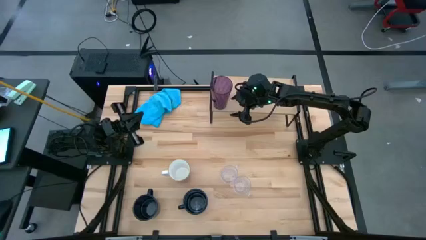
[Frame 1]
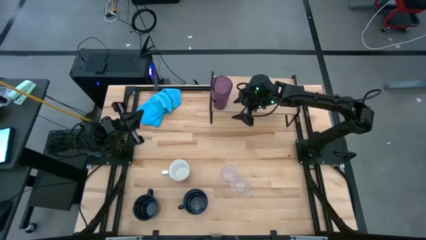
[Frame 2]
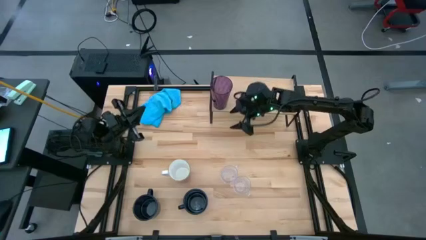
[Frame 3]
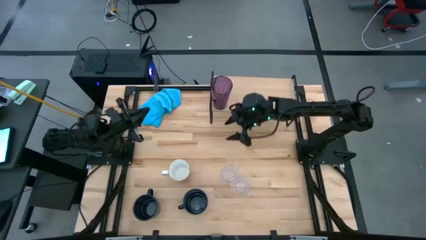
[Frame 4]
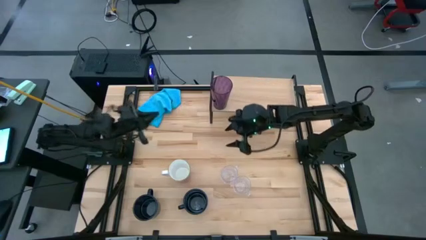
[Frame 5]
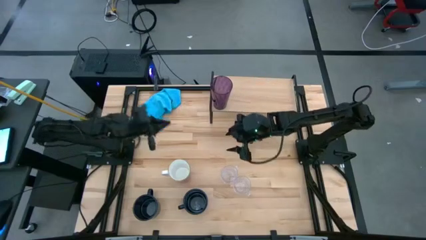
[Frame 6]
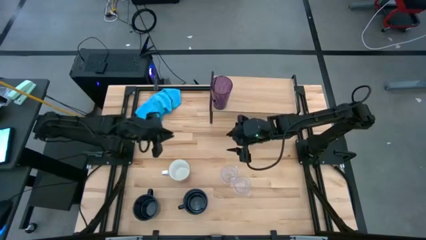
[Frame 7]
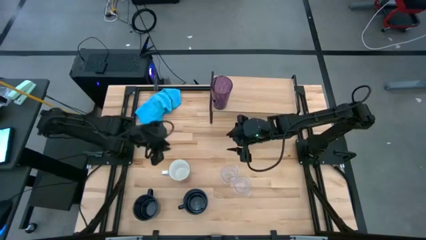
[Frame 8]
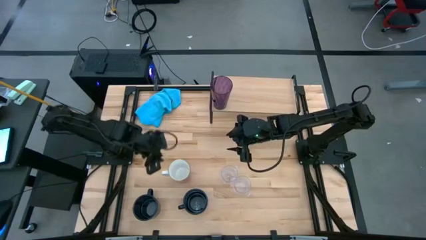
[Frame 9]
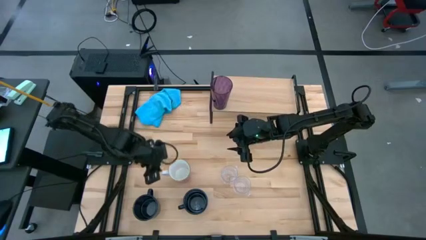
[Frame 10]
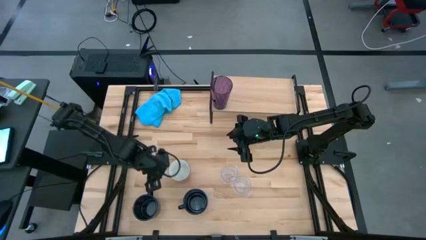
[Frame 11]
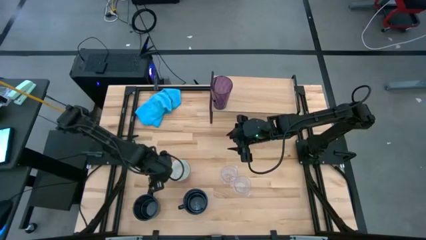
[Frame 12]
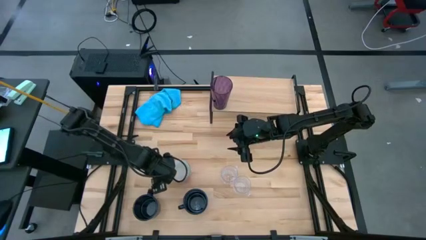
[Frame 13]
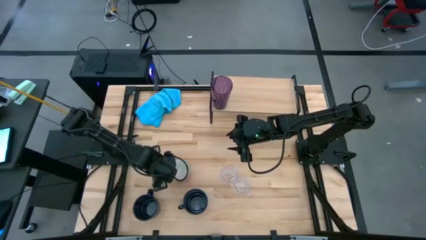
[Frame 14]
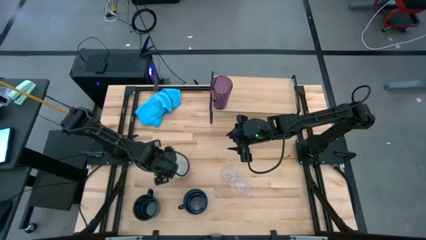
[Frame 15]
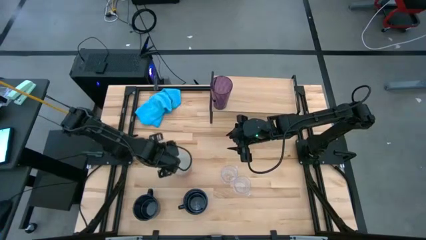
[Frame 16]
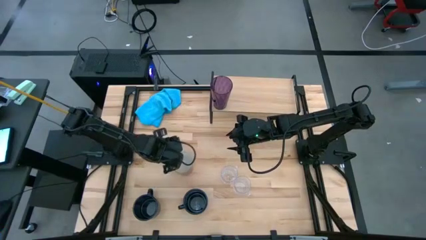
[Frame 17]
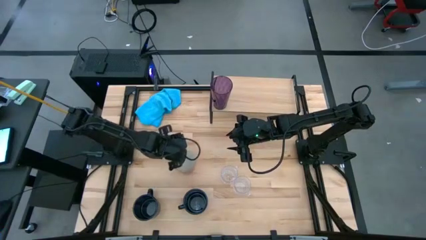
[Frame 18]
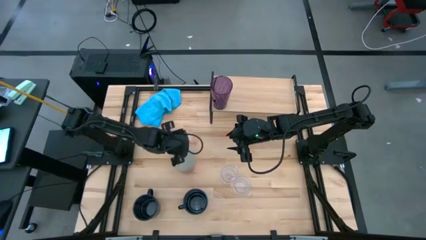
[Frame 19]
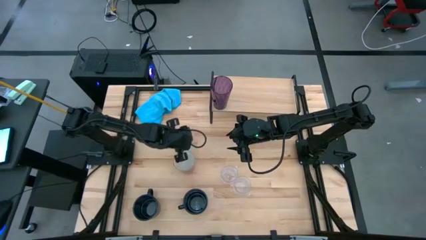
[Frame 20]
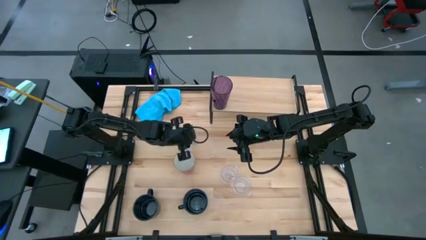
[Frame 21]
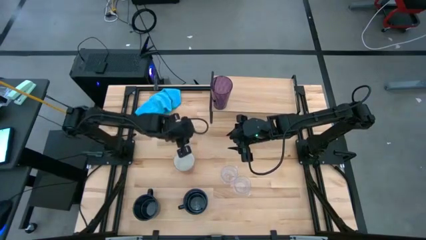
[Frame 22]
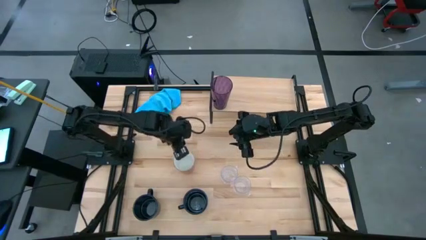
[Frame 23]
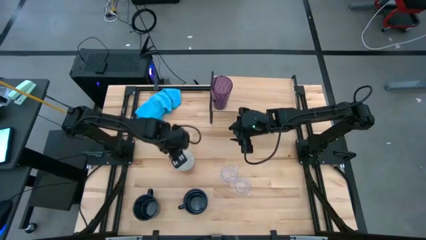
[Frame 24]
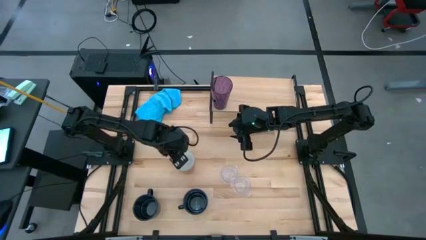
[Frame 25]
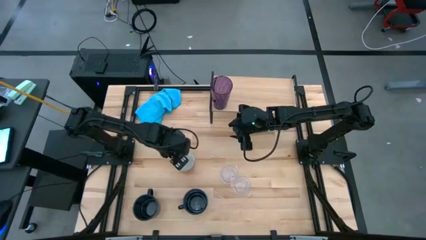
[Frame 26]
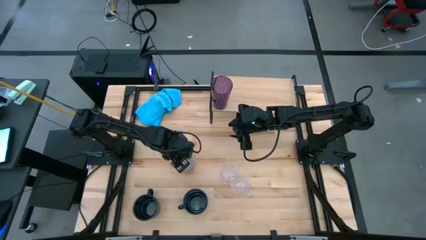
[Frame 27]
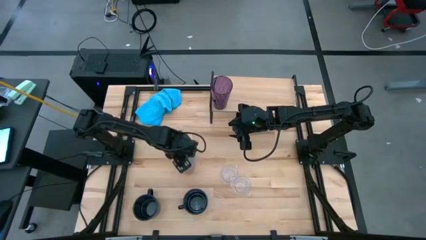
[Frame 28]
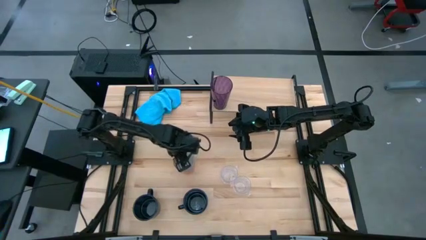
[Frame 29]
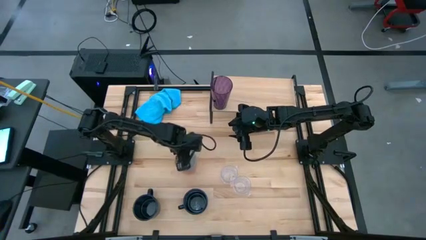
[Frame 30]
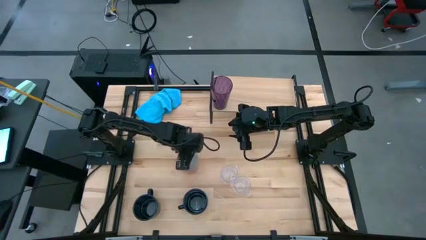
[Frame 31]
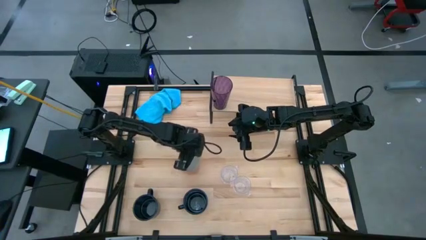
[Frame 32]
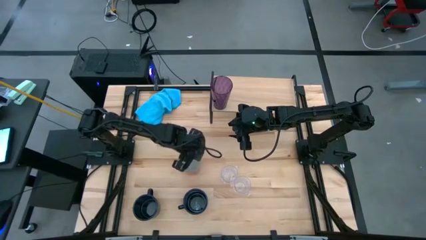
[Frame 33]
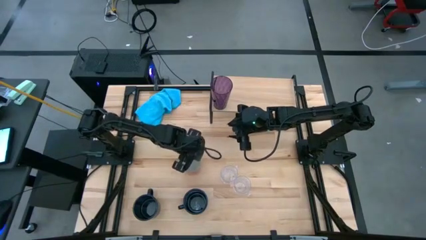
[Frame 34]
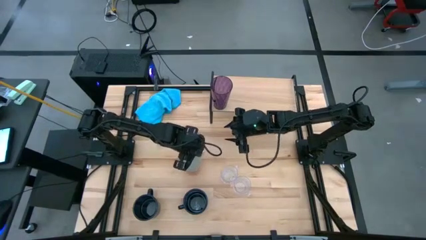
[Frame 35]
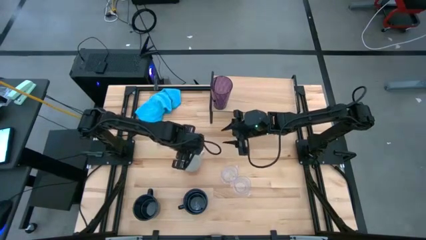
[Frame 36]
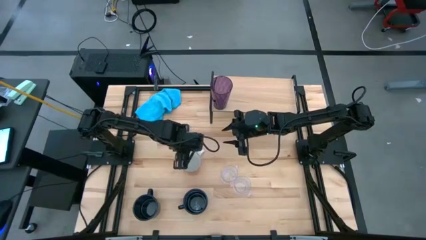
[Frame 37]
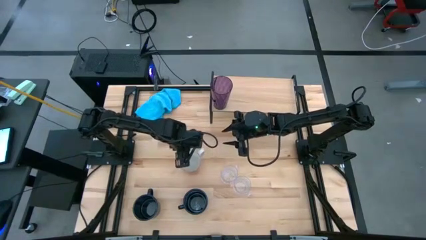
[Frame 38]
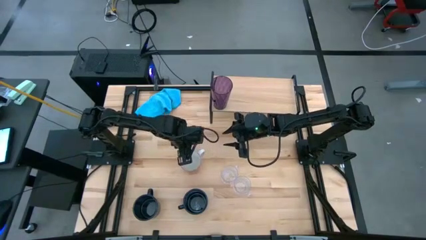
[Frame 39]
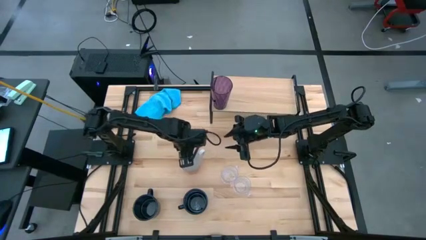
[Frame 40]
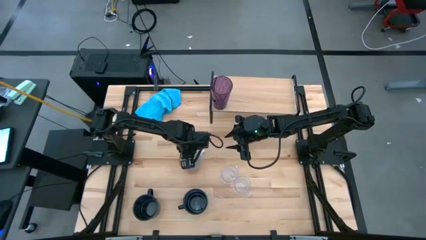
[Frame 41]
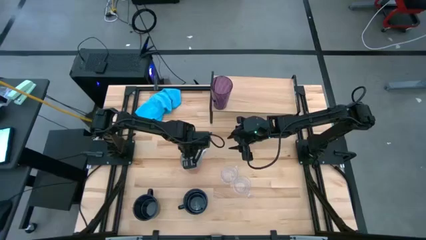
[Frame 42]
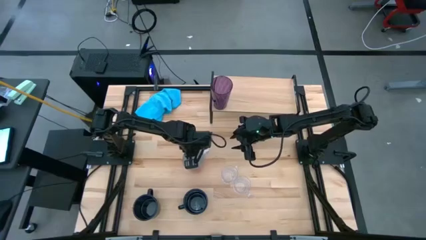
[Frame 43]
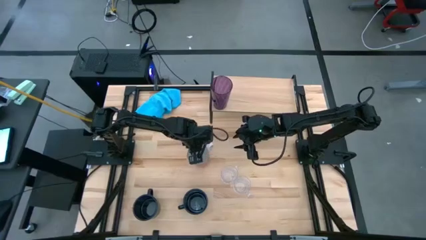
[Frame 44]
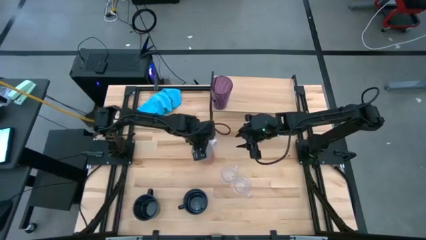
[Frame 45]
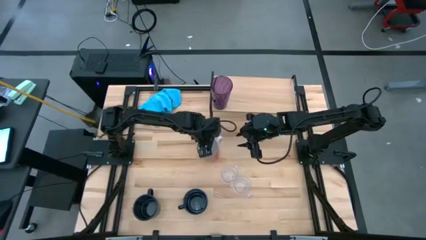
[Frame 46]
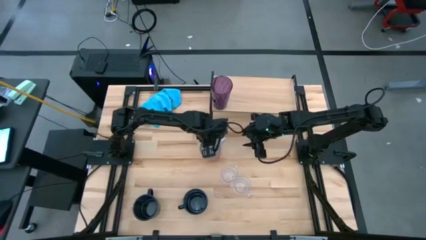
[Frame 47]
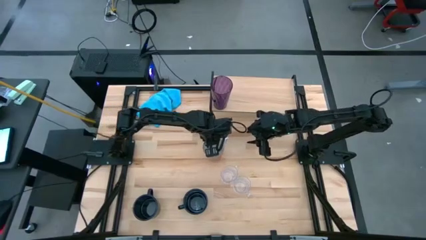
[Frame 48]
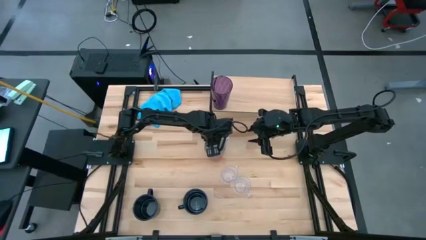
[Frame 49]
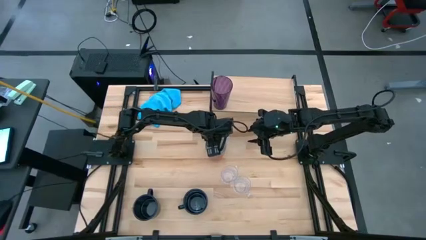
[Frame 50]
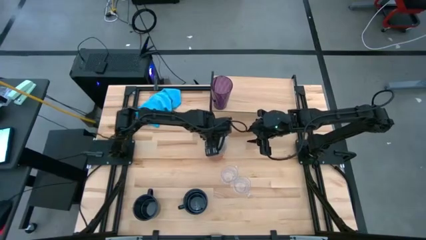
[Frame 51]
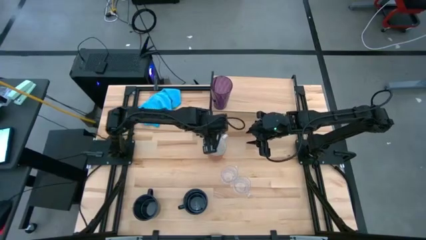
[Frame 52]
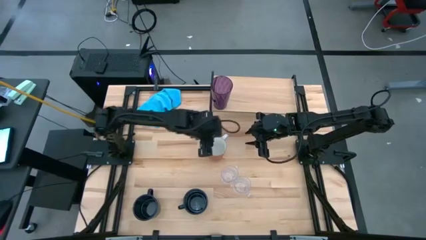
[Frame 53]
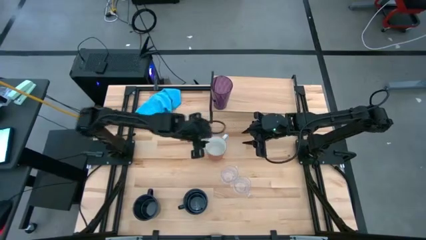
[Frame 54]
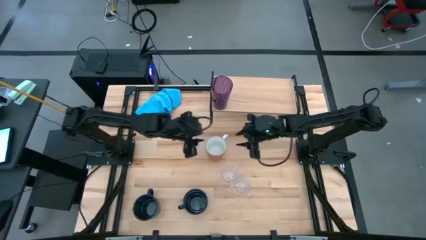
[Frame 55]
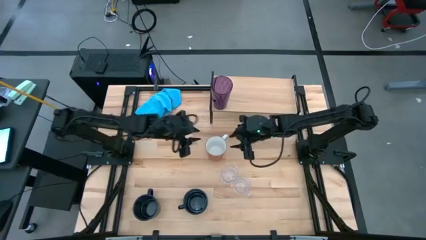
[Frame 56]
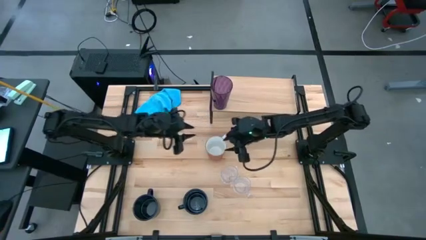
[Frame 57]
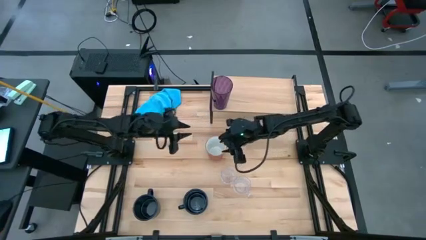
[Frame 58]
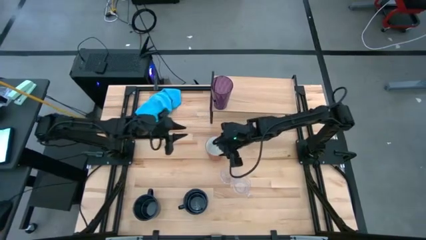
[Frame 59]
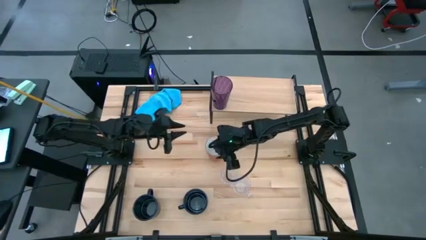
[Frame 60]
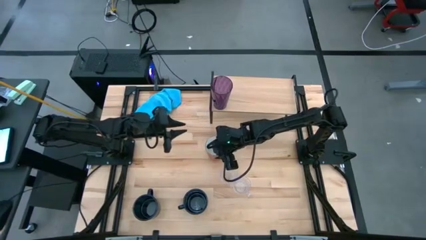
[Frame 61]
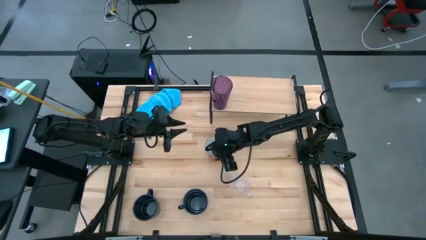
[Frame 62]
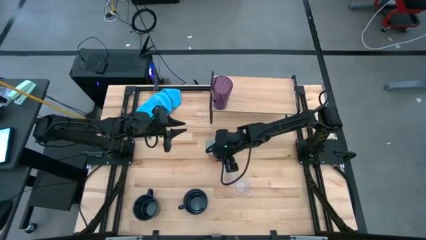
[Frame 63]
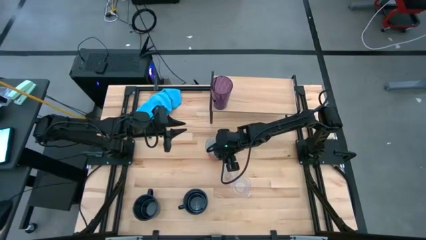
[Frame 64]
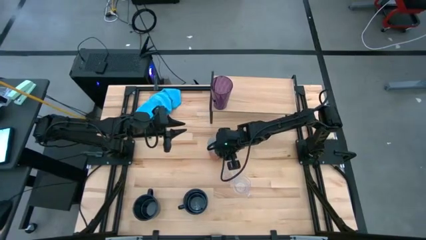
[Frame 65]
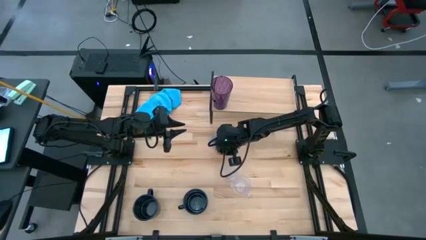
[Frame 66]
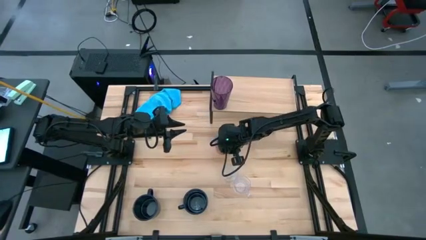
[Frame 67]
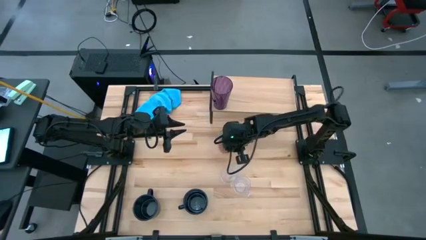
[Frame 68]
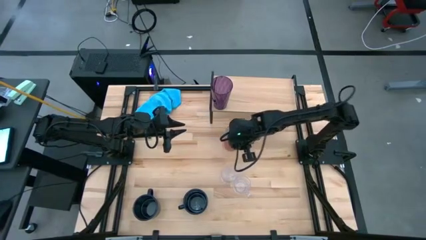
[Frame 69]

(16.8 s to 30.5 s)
Task: Stack small to large cups/mugs on shelf
Put the brown mug on the shelf
